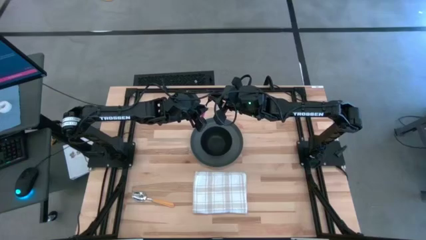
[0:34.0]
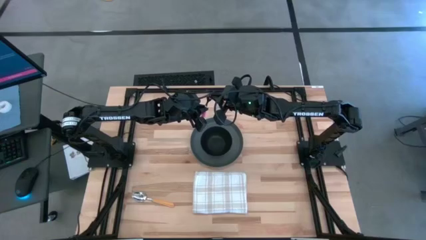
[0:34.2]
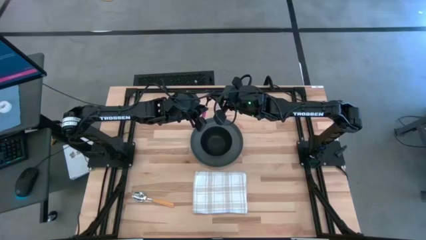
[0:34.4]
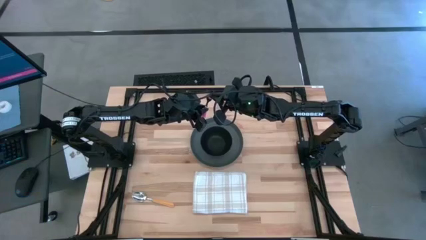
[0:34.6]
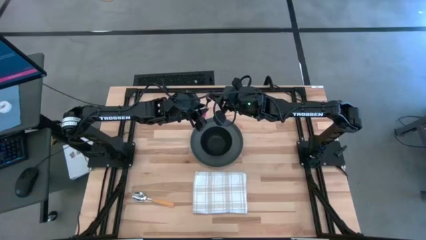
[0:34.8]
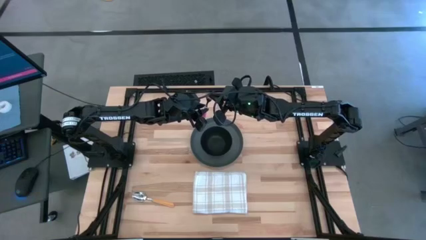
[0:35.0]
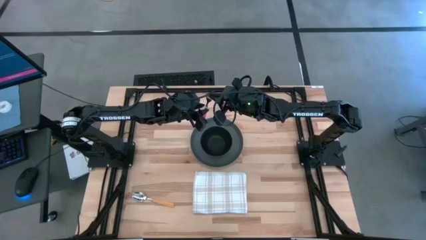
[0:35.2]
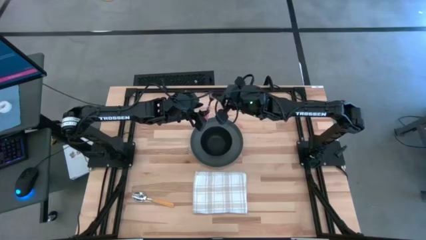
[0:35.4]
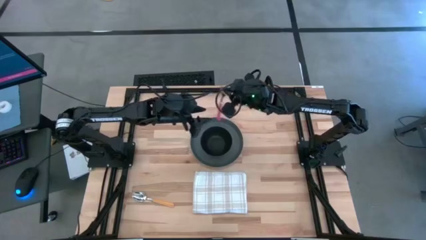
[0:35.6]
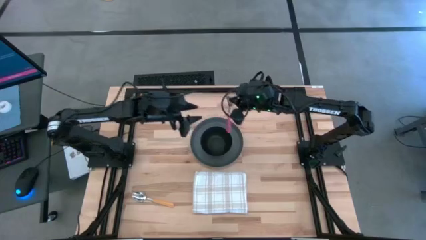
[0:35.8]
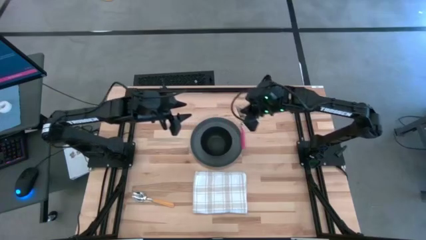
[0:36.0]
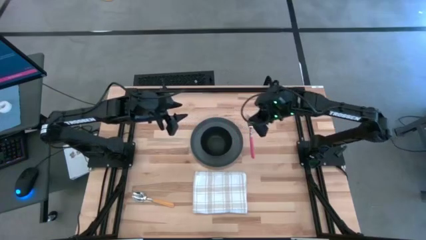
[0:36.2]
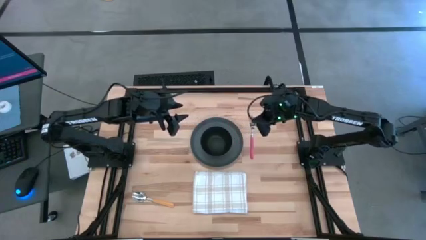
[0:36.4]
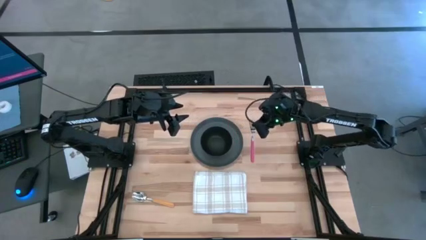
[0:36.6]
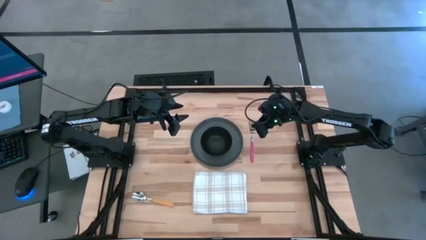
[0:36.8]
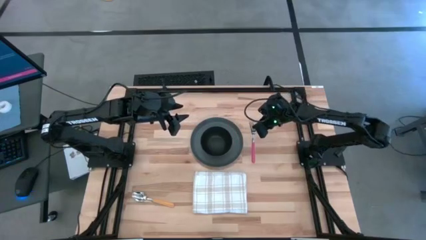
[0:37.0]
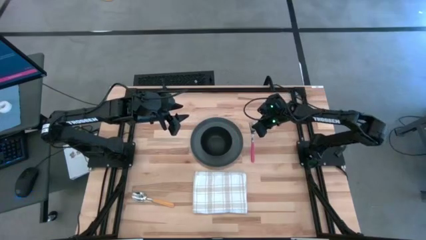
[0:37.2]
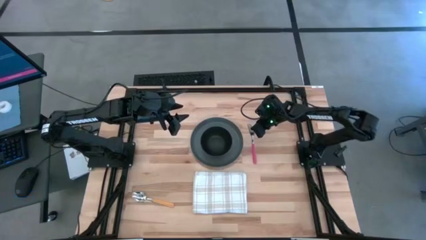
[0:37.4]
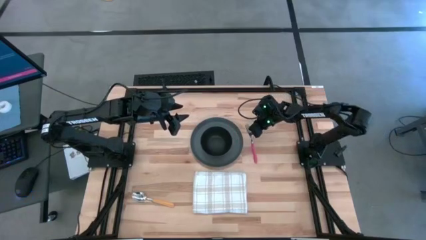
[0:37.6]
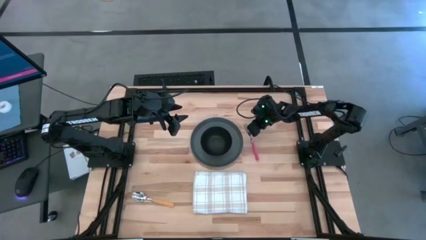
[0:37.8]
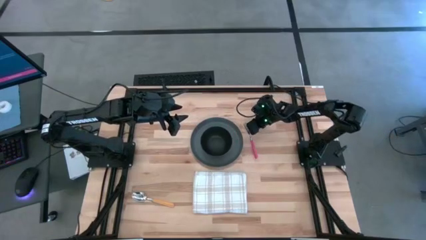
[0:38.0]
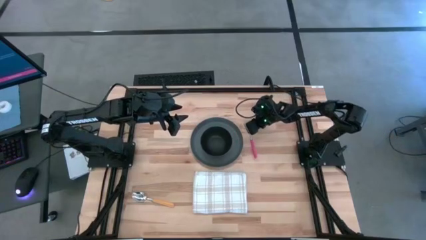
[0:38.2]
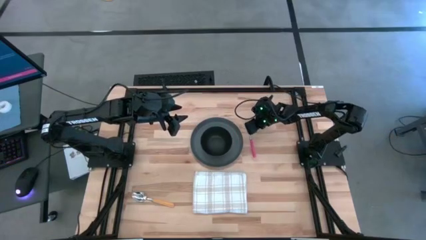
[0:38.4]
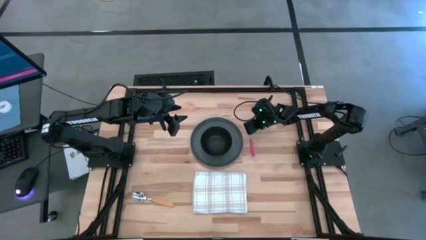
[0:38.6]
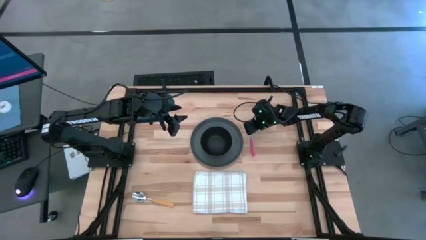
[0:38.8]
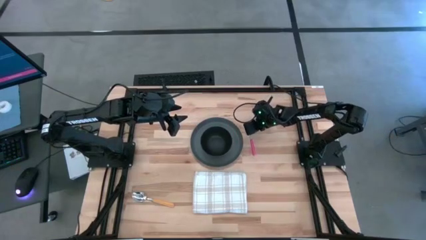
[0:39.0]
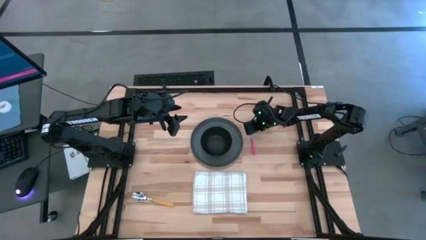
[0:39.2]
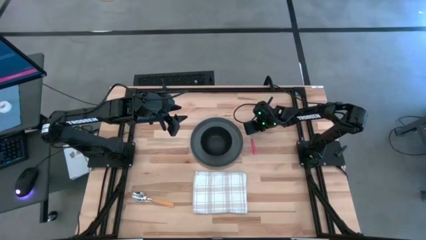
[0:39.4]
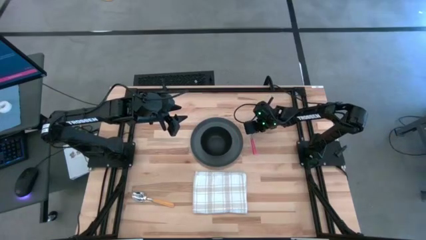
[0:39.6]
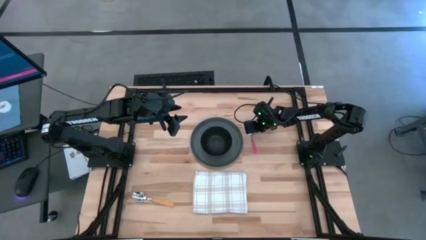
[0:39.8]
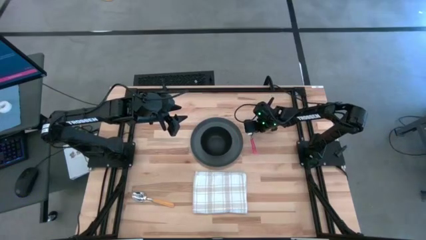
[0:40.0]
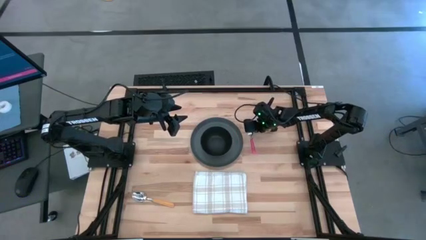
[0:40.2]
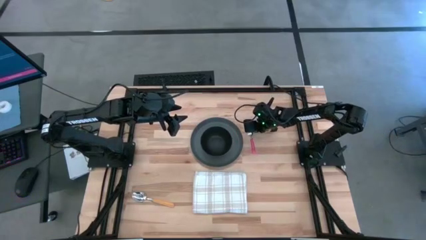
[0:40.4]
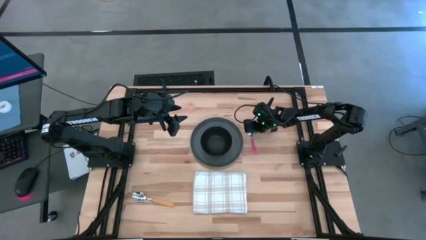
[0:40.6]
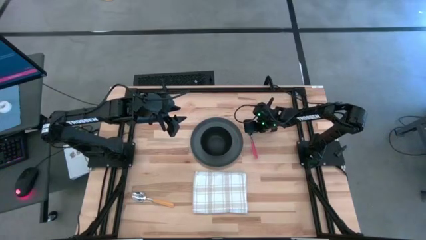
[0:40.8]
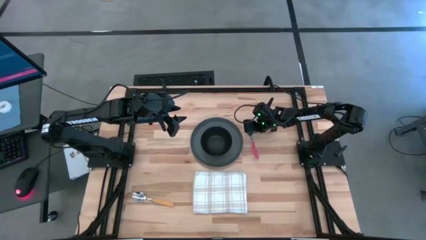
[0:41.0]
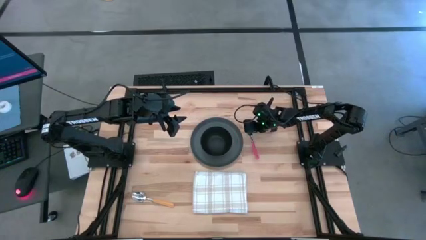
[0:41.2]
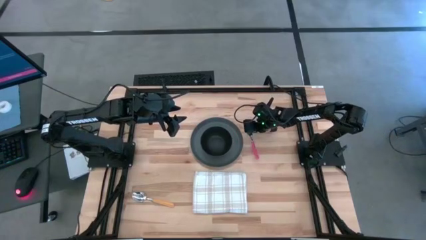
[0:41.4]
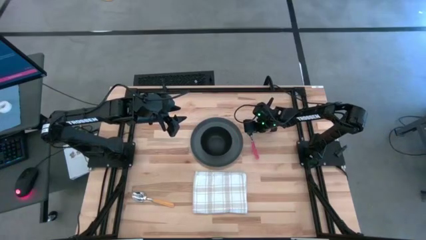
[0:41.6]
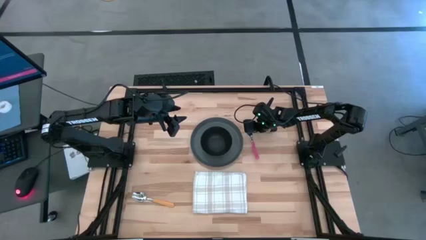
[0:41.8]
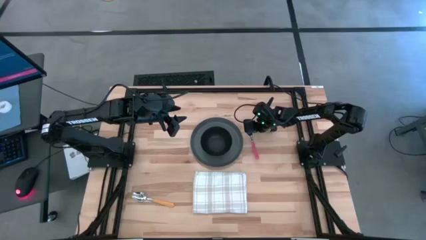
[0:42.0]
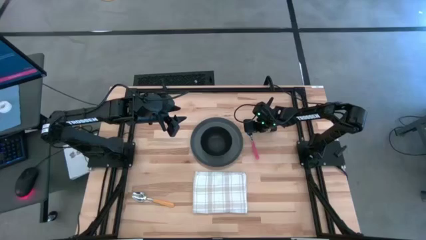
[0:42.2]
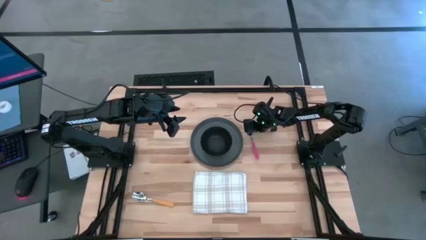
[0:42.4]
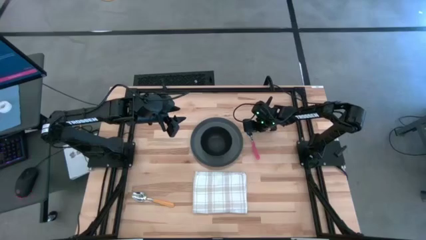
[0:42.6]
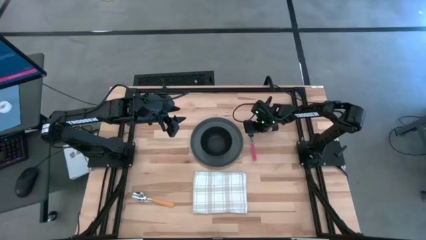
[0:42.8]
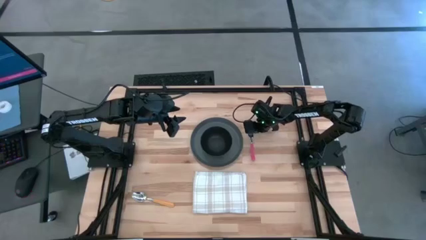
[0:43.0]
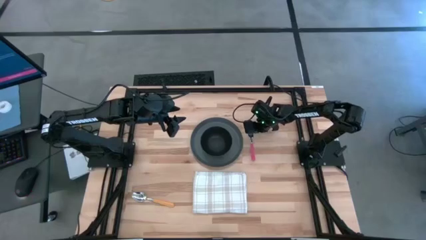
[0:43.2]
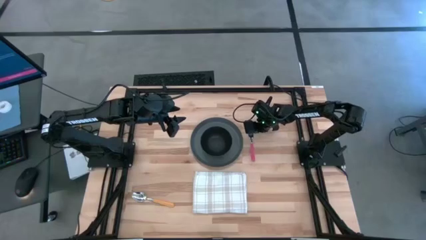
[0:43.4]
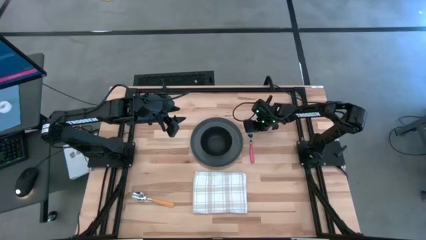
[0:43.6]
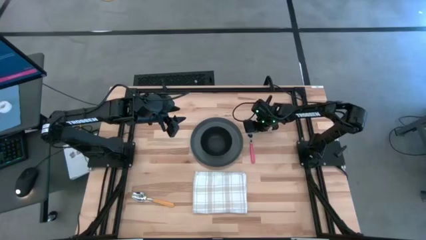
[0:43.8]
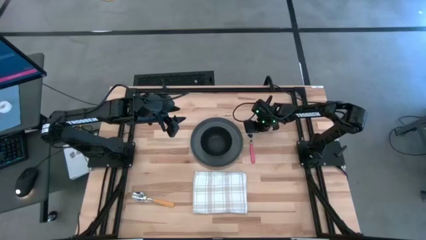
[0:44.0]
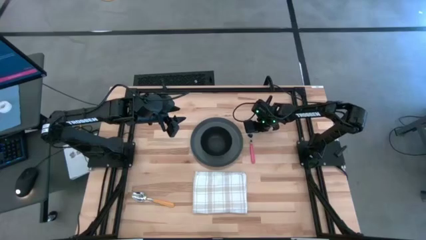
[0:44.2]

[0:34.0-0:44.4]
Task: Set table place
Move the red fork to the right of the black plate

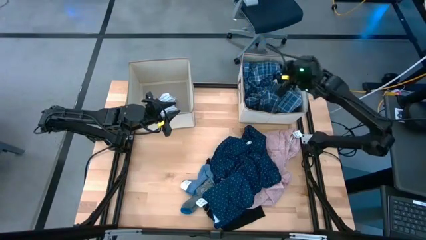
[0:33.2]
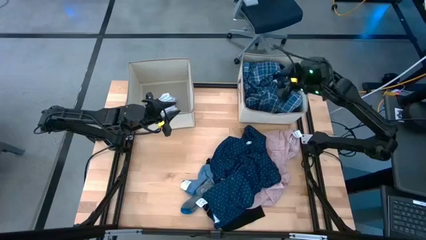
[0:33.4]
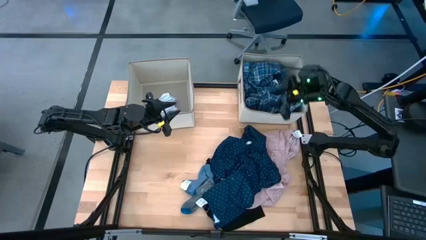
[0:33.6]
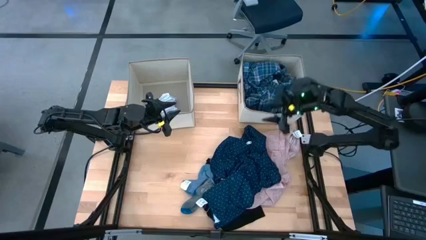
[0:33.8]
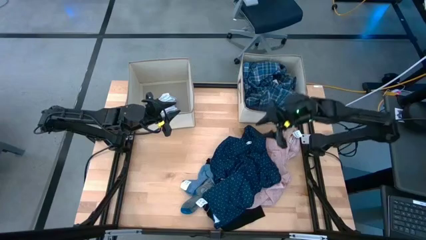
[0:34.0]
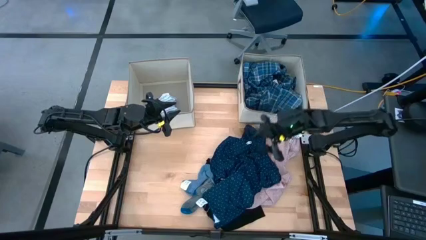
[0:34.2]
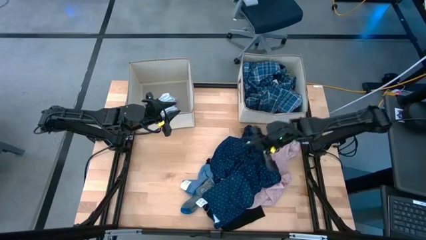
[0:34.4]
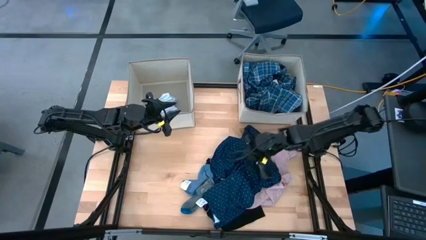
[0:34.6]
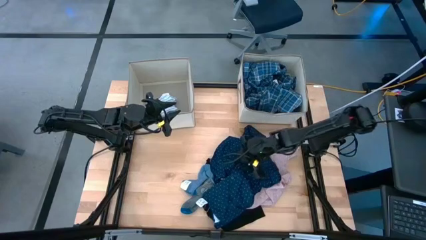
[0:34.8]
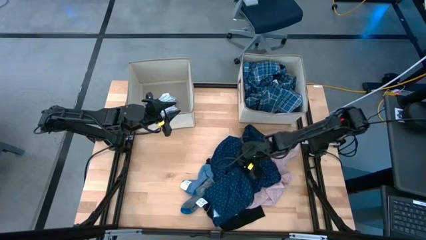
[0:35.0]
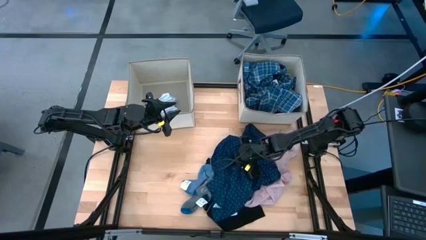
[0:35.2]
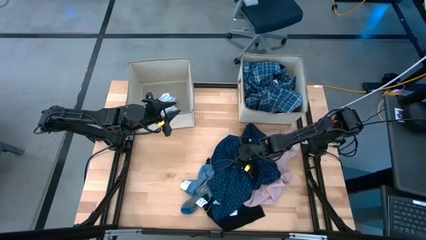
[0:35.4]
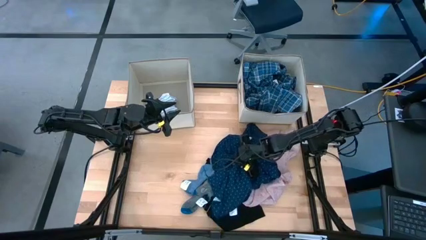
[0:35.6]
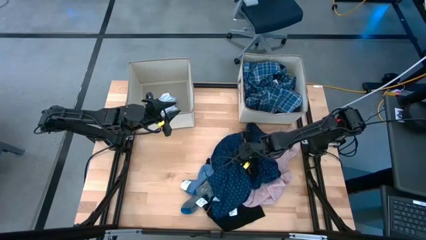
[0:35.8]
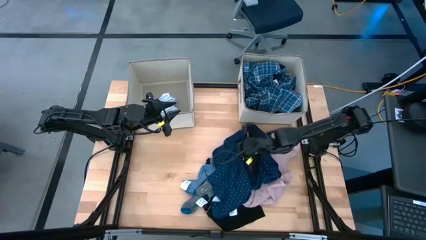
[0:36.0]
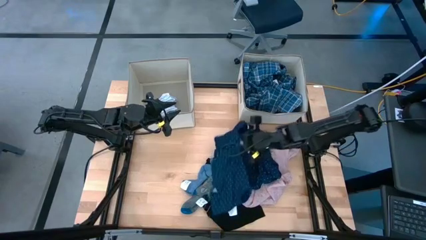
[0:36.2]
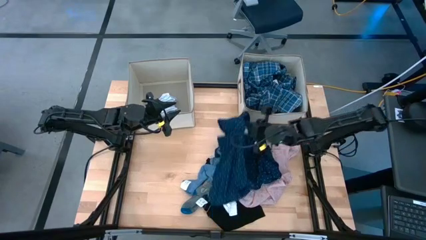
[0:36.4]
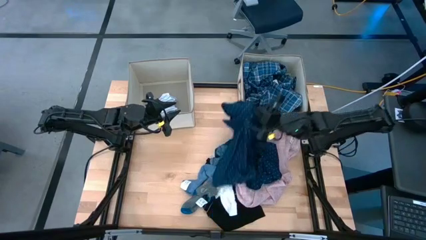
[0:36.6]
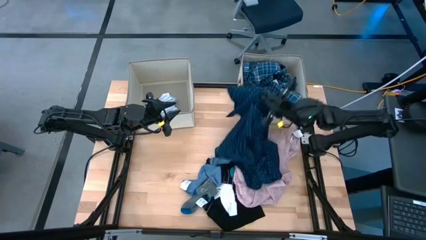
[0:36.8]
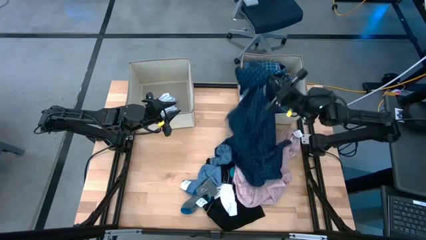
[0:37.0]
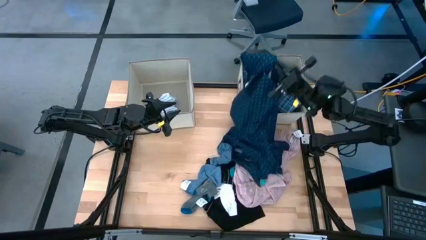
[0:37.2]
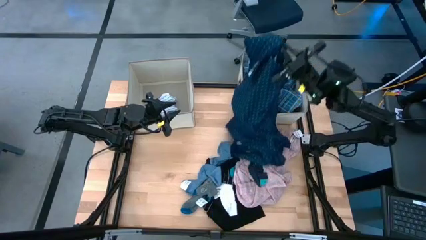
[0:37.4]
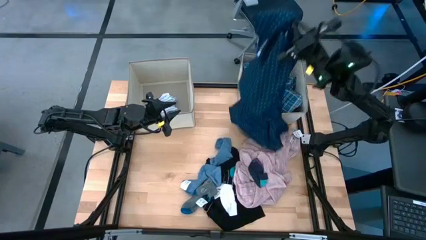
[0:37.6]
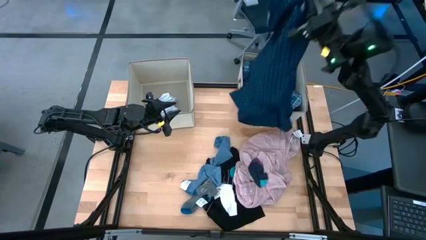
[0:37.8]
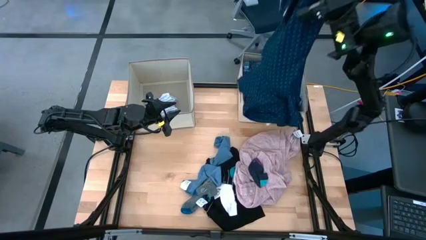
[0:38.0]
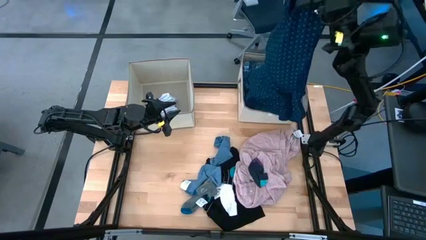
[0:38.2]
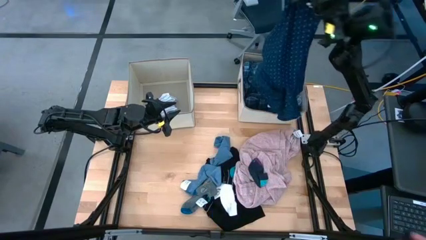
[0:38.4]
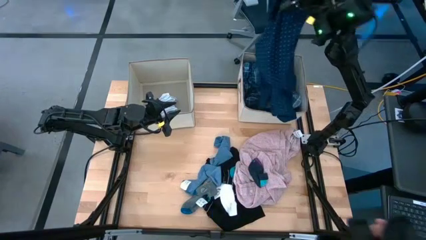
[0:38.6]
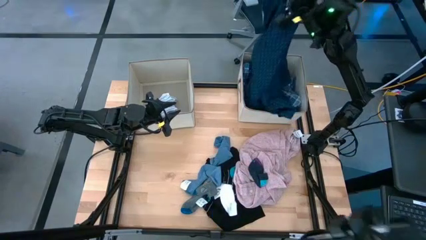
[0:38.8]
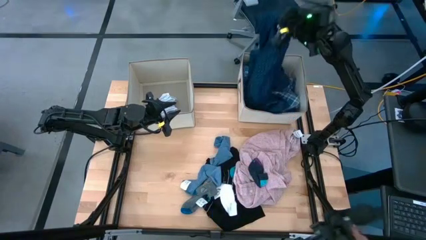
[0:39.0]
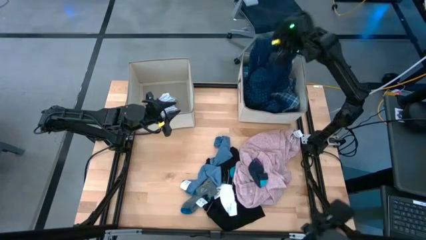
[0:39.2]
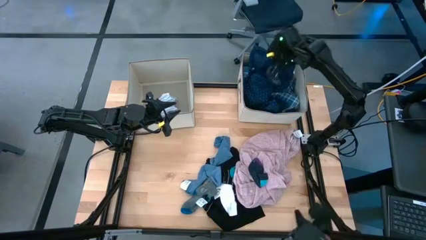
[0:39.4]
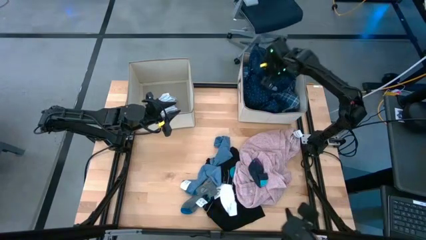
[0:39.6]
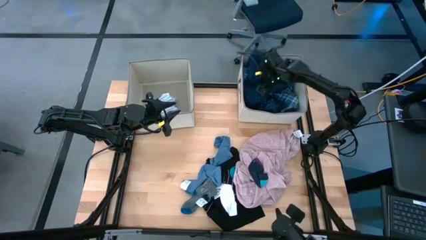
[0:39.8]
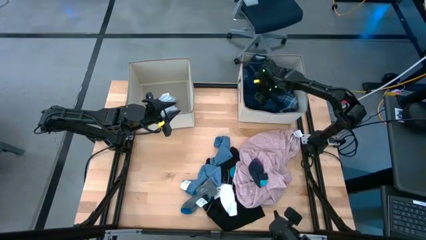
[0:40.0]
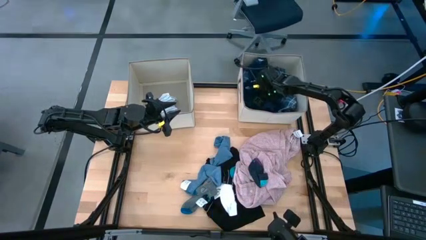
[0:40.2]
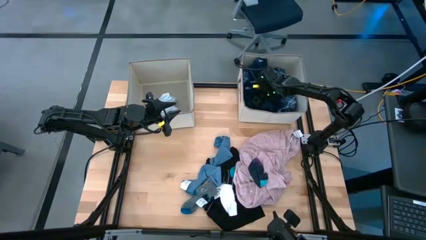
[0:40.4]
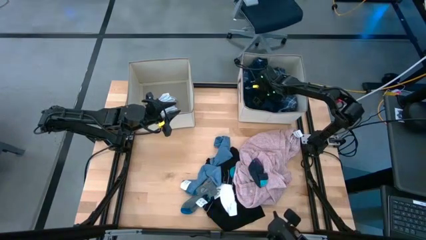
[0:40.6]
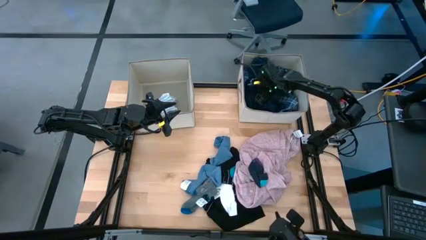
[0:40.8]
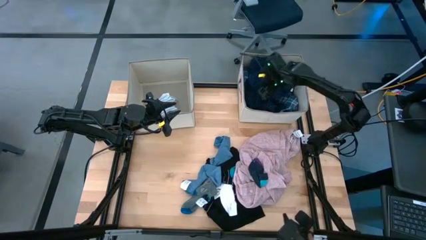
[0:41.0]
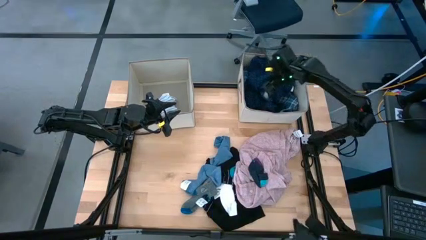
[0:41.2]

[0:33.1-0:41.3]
Task: Sort clothes
Put the dark blue polo shirt into the right laundry bin
